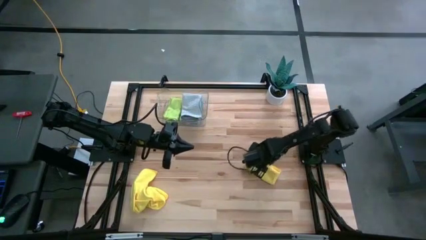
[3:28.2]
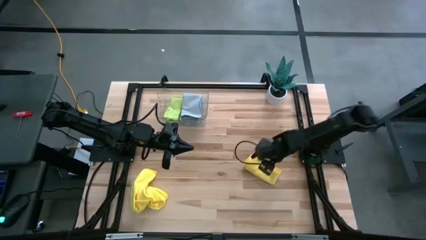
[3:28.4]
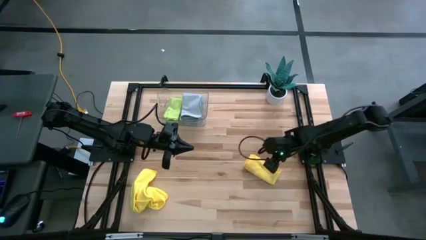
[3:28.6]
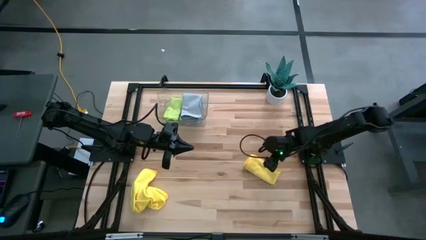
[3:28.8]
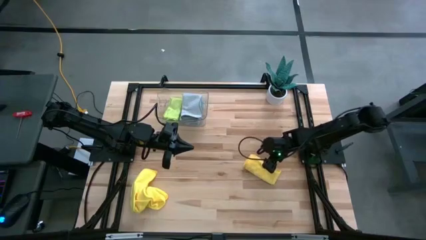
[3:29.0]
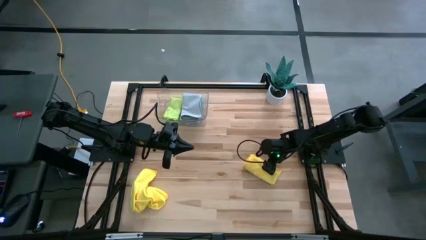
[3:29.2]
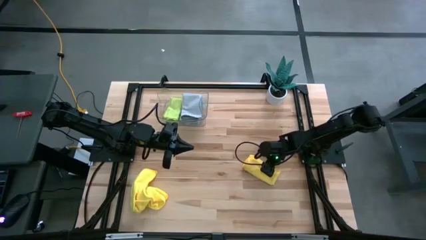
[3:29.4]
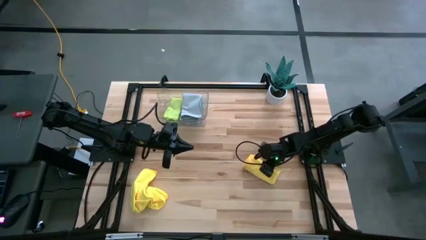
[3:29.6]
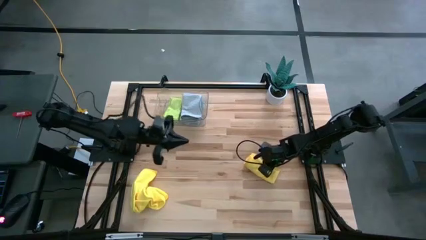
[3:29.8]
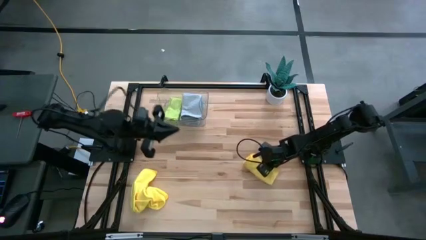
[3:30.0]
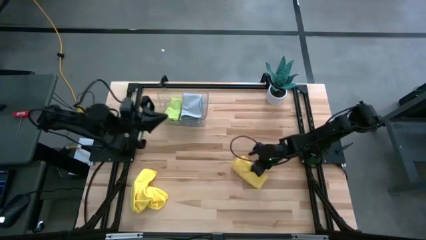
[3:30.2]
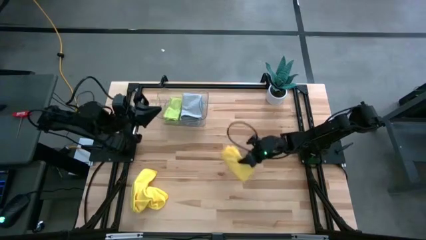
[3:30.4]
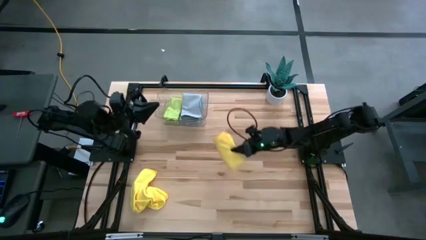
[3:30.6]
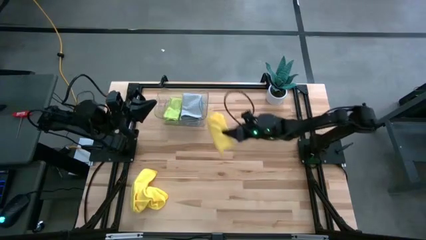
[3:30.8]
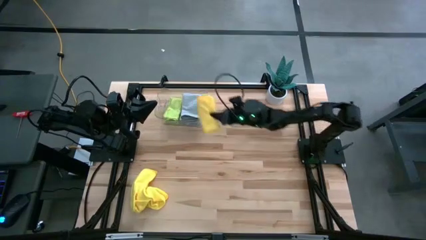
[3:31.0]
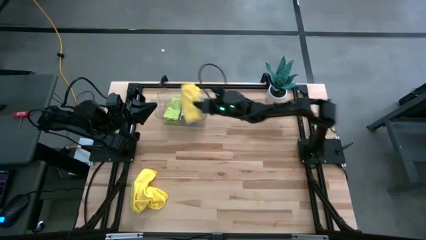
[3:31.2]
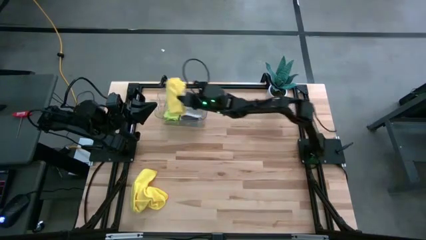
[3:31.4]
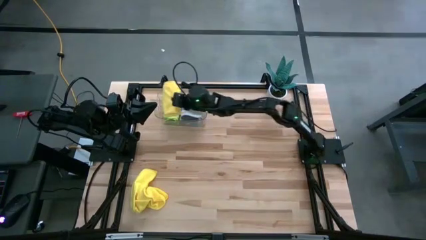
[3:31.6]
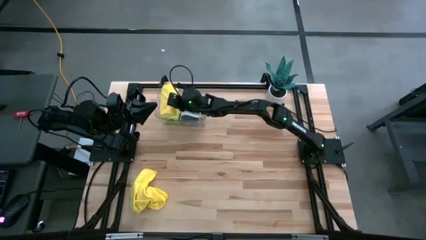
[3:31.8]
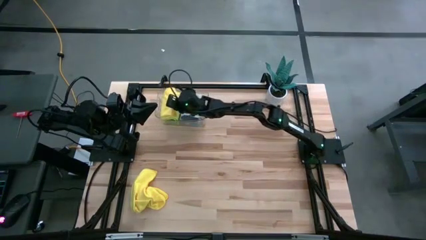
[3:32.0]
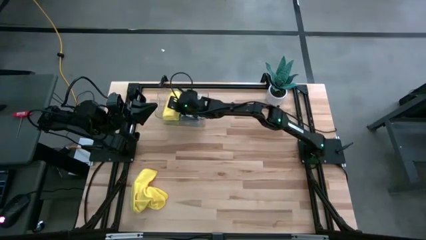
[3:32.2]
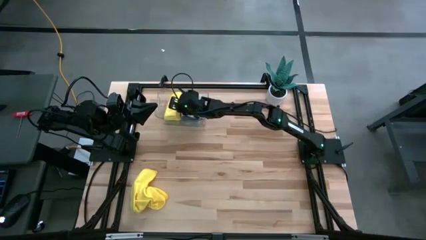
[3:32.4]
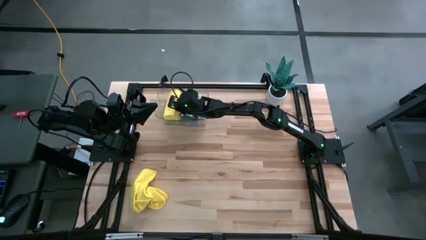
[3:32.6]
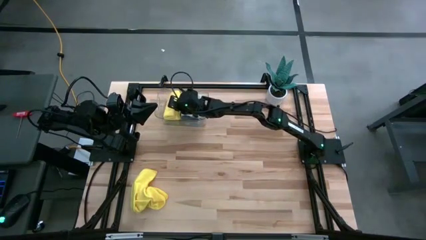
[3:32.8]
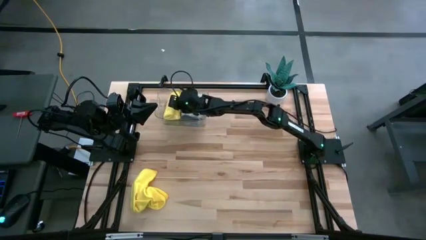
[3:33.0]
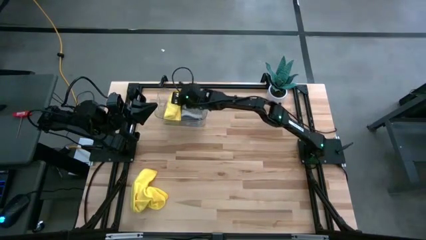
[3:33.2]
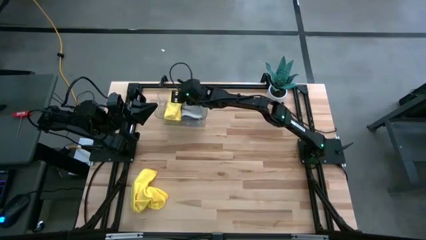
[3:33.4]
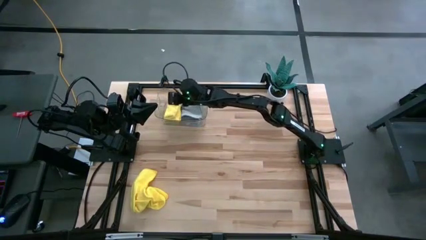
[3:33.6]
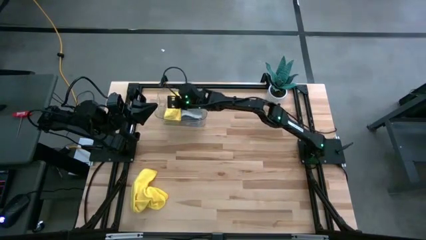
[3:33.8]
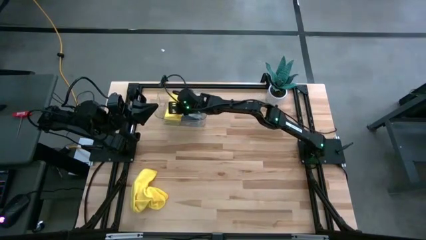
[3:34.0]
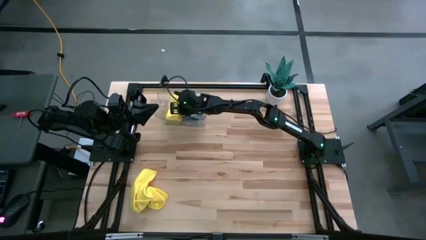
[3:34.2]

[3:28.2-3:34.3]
Task: Fold microfiber towels
Put the top yellow towel into the transparent bin

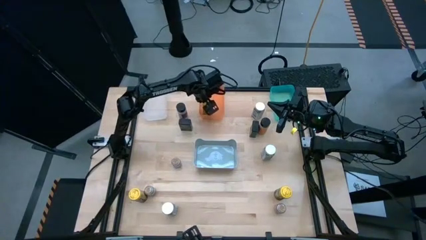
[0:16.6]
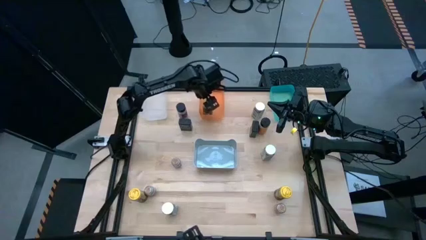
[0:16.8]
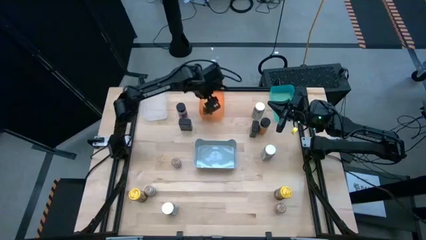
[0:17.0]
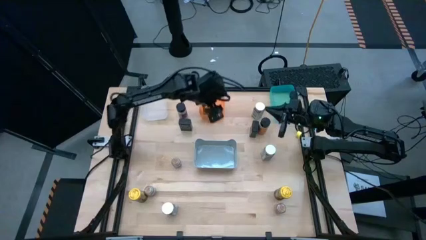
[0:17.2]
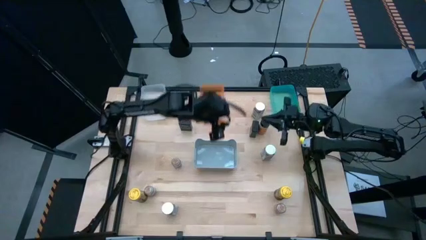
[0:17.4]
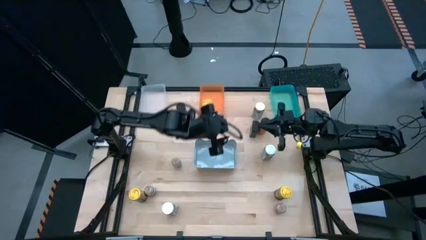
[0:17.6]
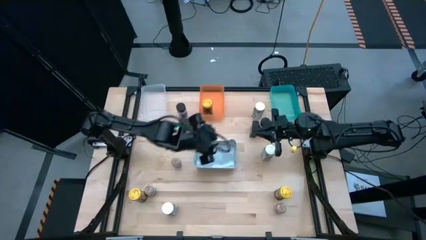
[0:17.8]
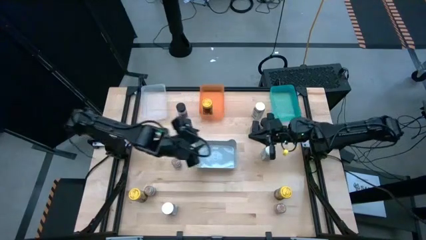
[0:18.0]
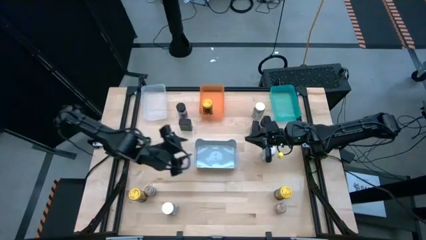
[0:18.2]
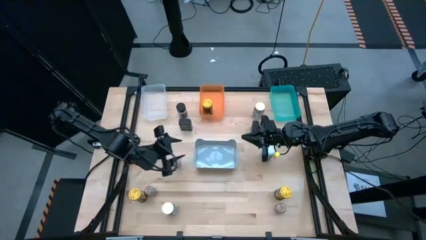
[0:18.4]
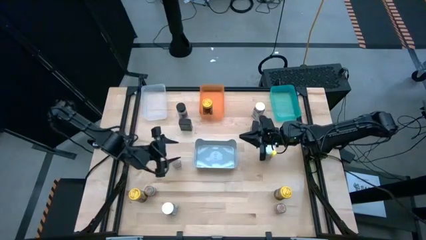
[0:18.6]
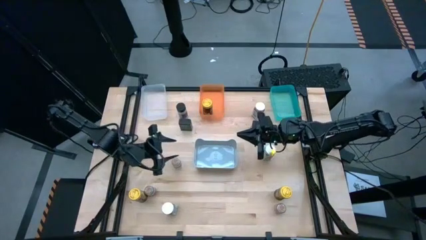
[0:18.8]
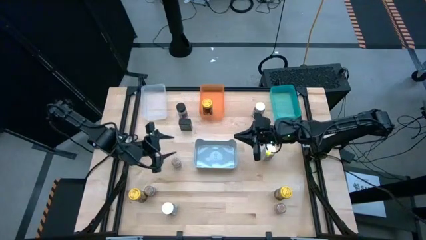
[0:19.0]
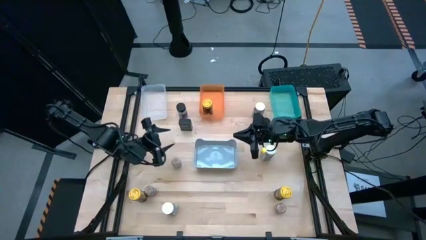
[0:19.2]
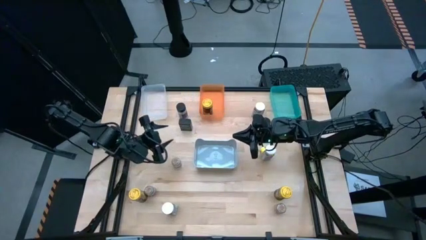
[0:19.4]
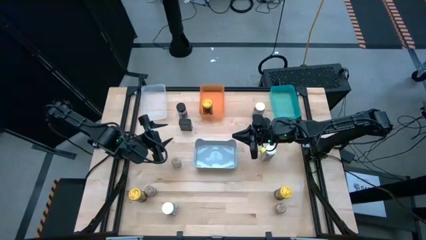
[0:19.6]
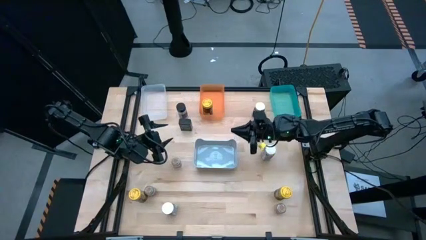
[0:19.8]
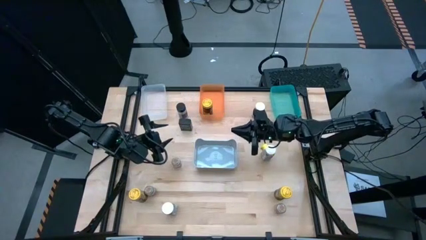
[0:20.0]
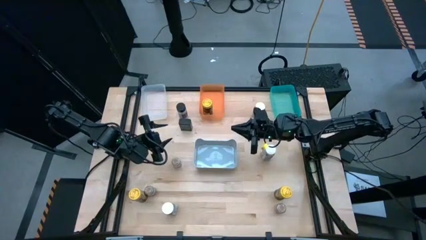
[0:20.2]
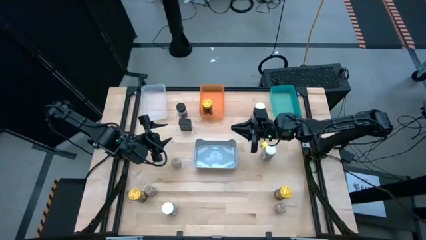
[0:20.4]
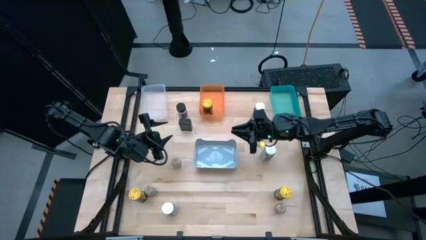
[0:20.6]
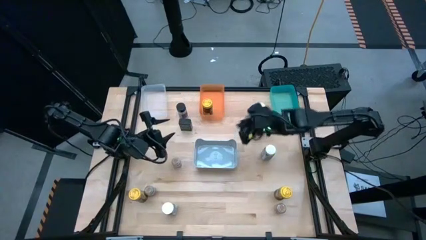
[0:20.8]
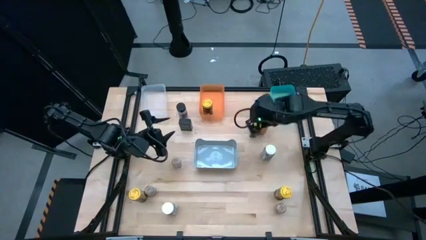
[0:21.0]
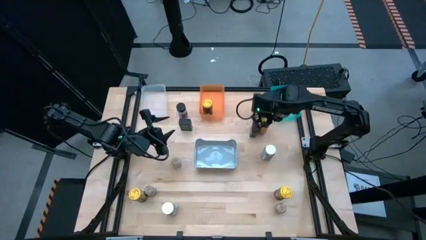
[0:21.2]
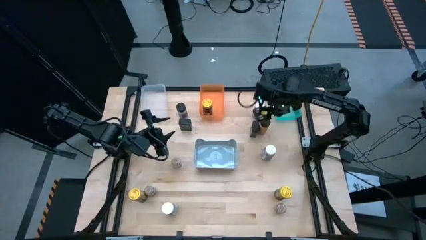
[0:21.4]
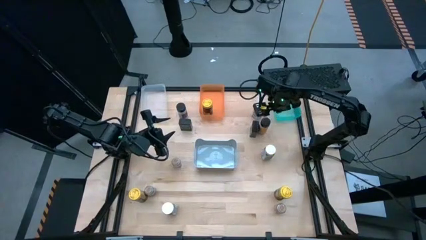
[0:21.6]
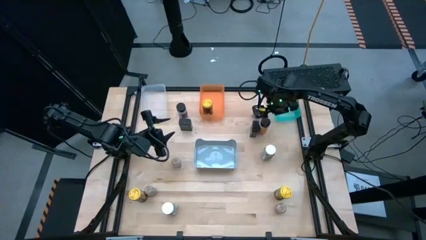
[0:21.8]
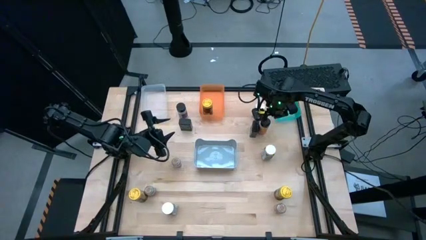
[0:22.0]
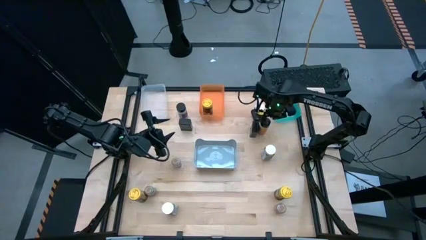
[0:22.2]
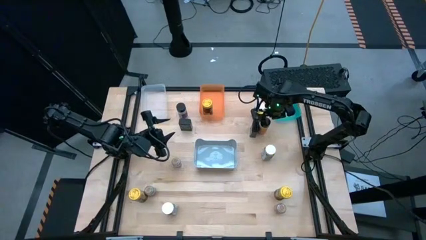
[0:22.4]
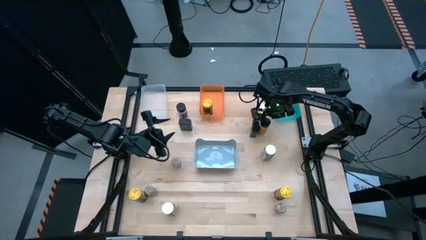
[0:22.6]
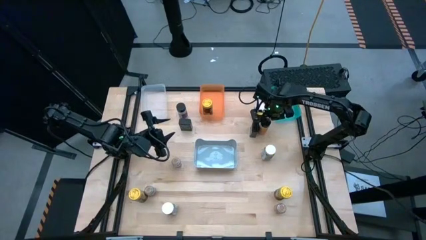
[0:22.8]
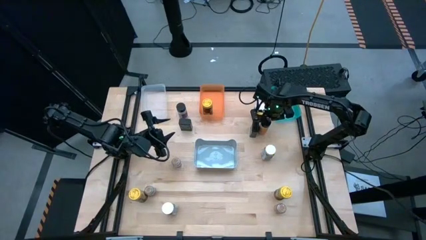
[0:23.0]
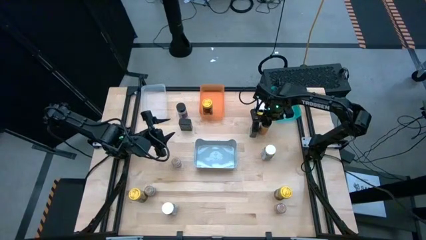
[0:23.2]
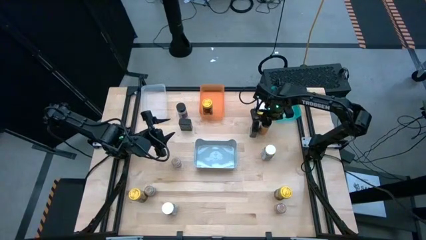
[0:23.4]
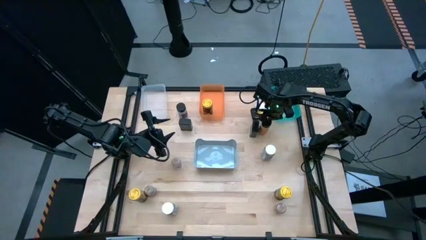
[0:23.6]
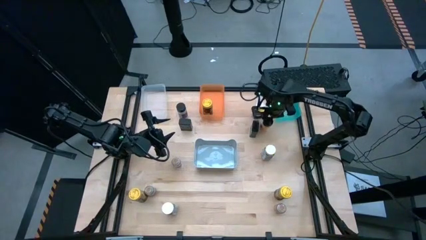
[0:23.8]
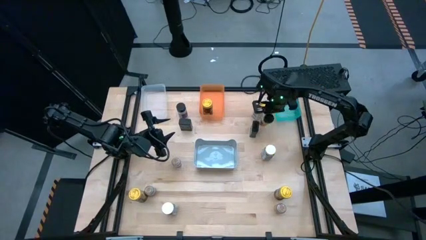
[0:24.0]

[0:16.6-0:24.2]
Task: Sort spices by type
Put the right black seasoning bottle into the green bin

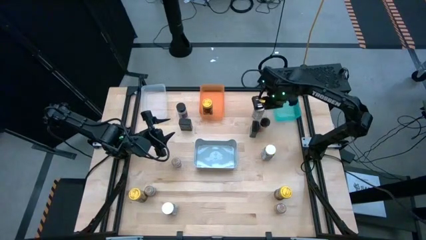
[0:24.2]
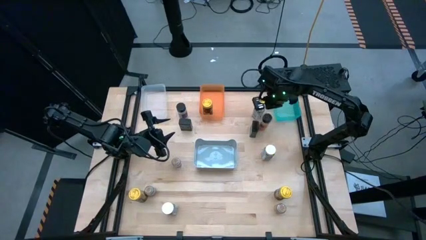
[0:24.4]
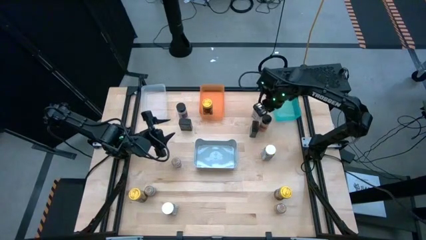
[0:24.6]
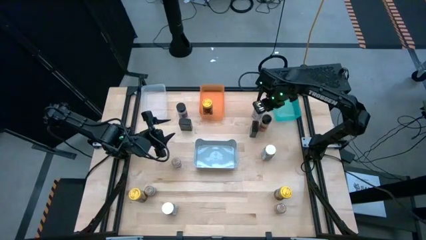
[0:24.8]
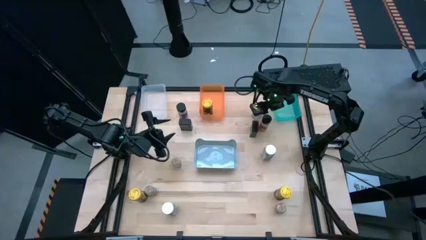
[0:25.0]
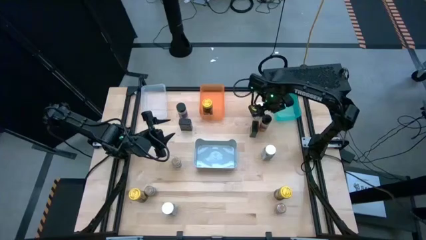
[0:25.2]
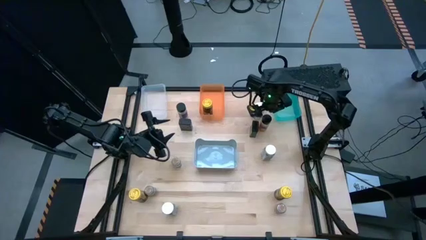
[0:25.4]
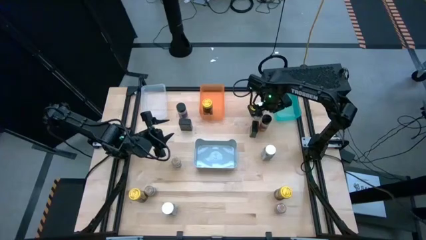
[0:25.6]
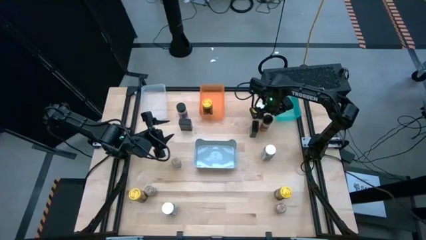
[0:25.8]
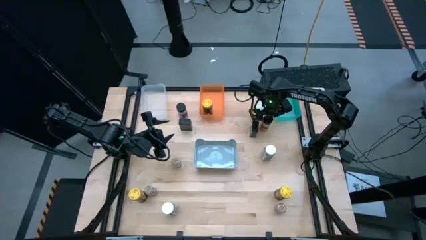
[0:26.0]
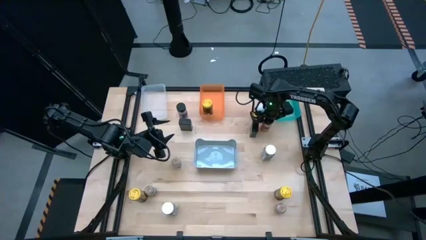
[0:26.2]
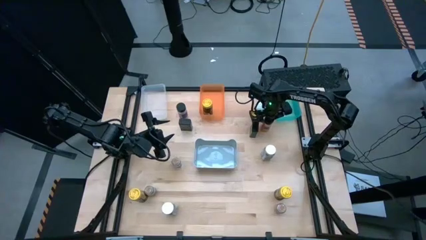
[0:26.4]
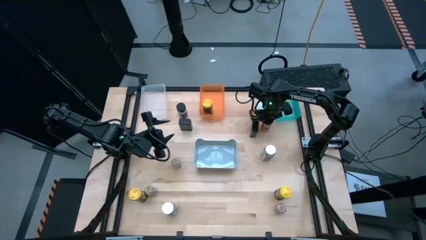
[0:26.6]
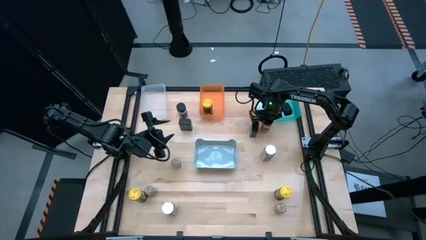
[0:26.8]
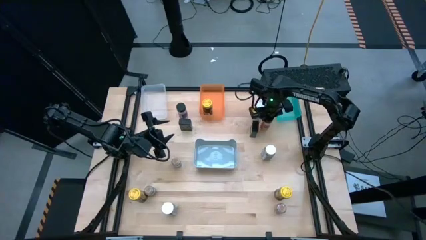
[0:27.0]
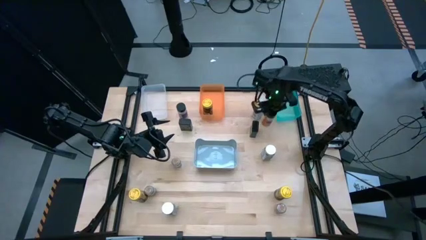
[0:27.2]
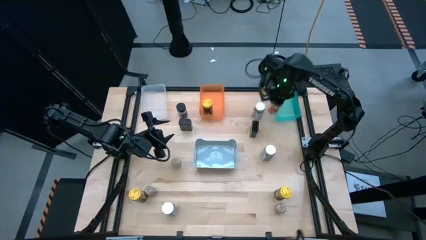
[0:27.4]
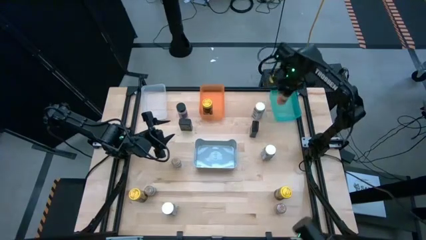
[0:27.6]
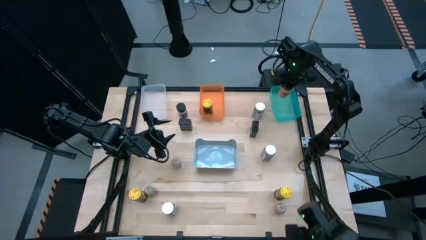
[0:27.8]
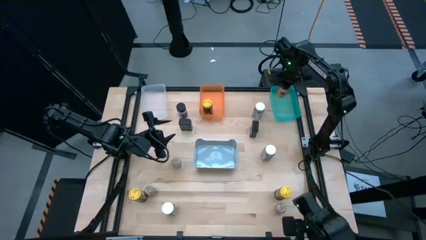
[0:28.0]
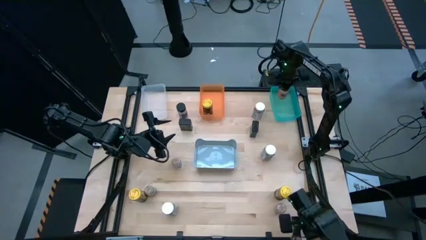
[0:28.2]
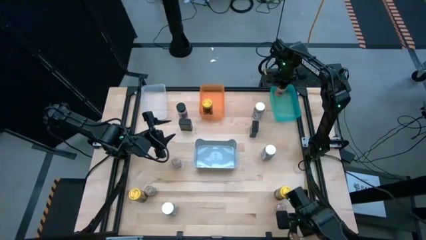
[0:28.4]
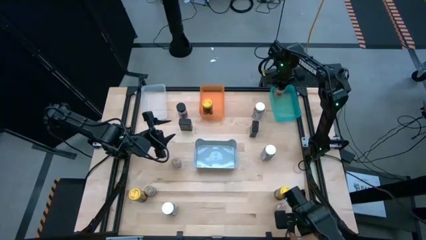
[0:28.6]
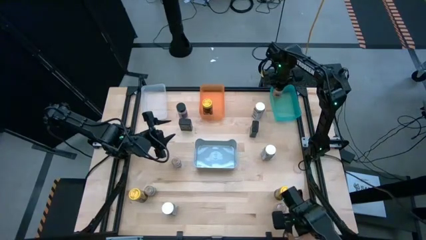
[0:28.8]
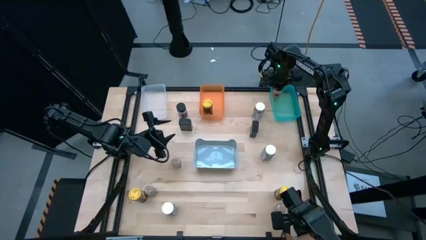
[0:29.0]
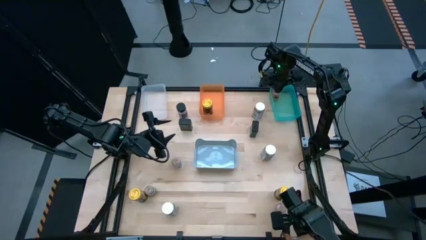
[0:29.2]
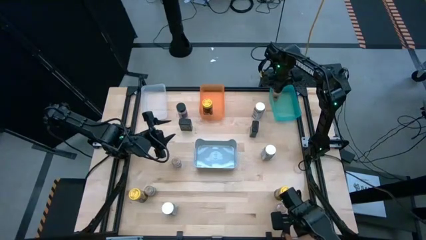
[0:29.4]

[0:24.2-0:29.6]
Put the right black seasoning bottle into the green bin
